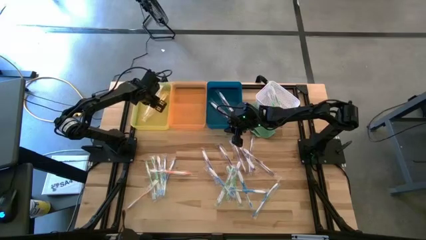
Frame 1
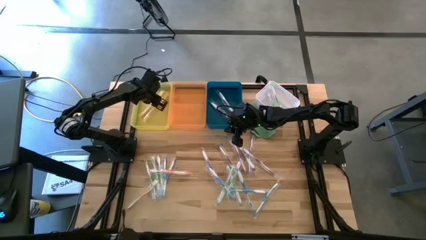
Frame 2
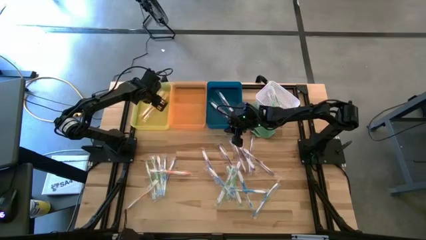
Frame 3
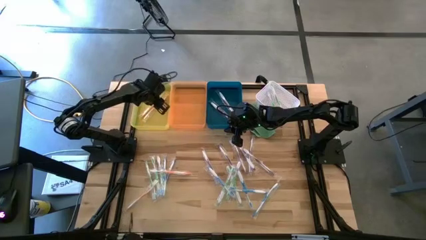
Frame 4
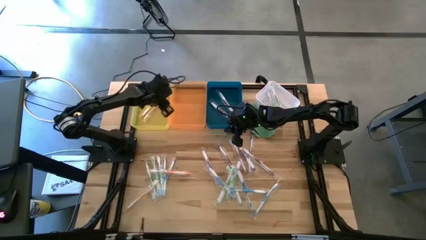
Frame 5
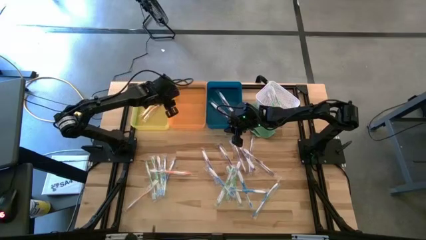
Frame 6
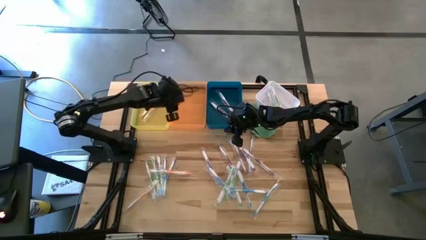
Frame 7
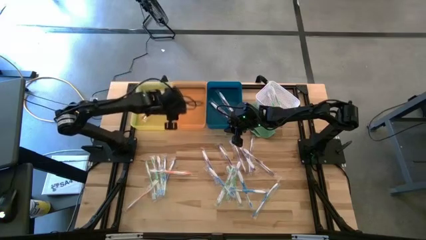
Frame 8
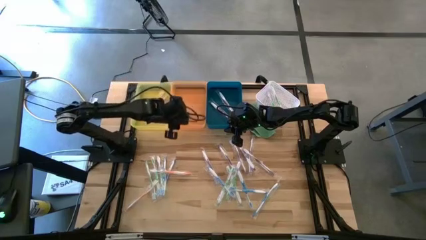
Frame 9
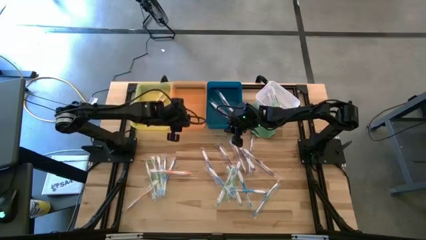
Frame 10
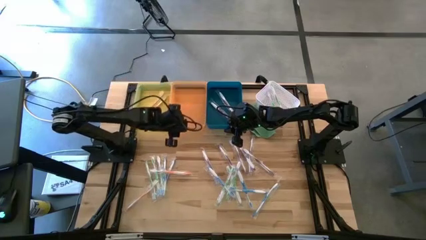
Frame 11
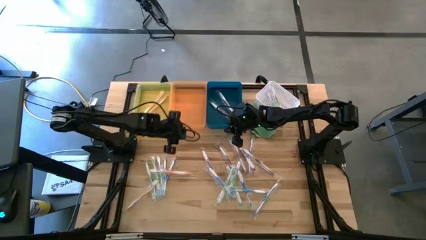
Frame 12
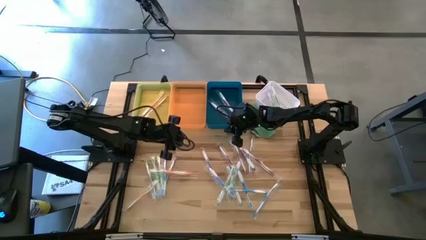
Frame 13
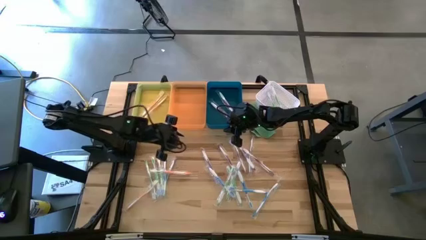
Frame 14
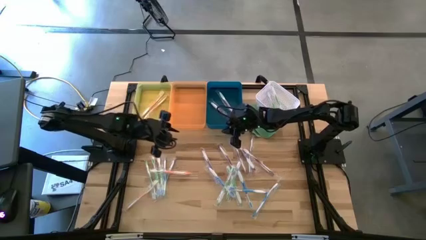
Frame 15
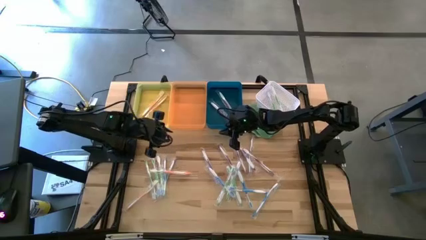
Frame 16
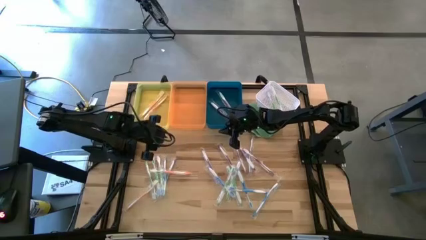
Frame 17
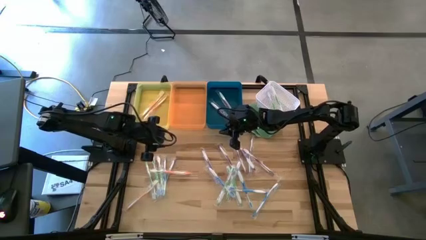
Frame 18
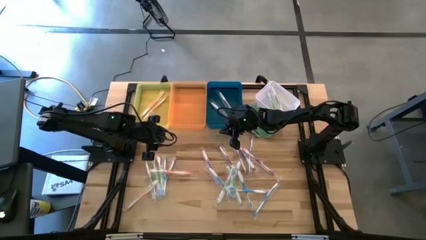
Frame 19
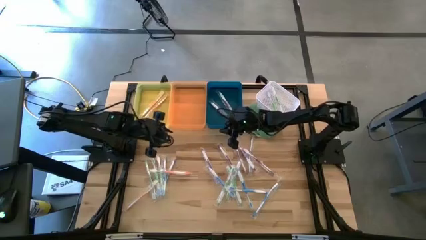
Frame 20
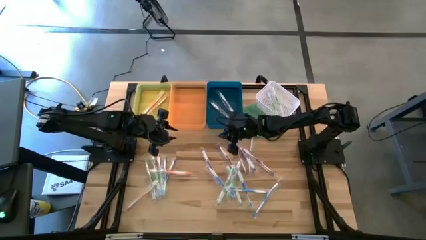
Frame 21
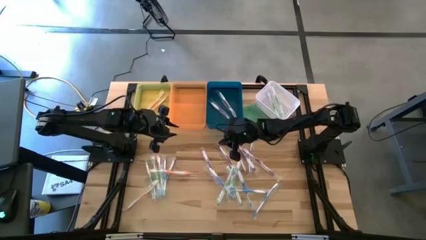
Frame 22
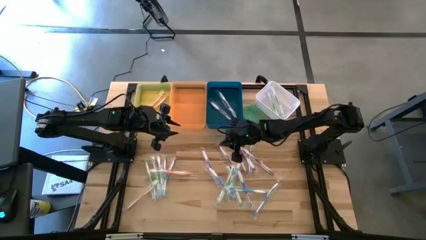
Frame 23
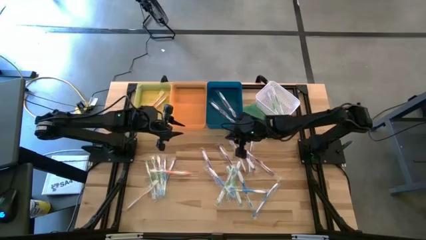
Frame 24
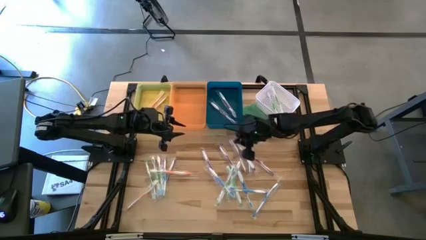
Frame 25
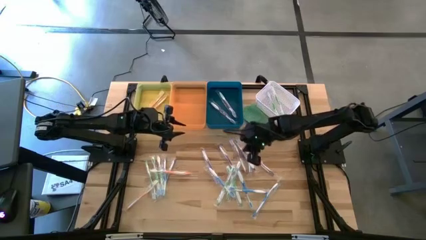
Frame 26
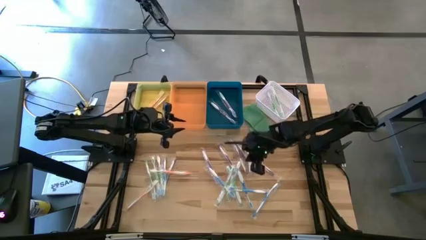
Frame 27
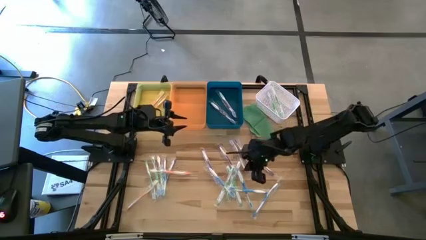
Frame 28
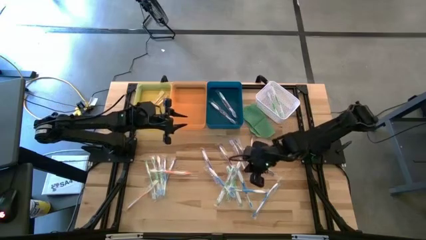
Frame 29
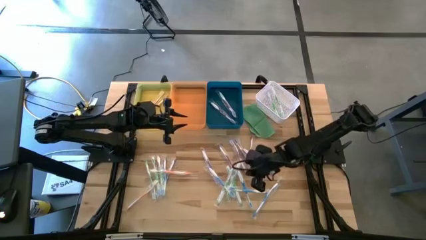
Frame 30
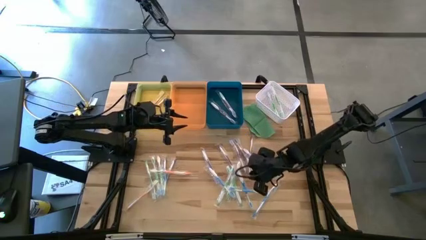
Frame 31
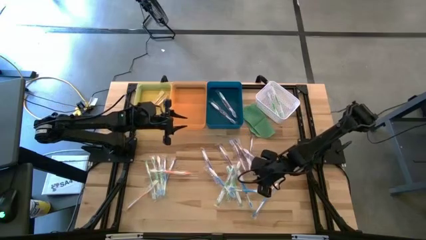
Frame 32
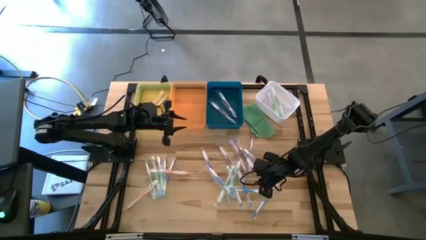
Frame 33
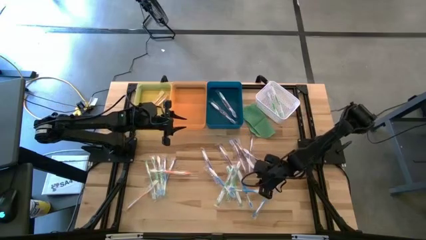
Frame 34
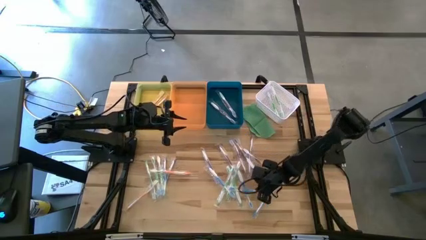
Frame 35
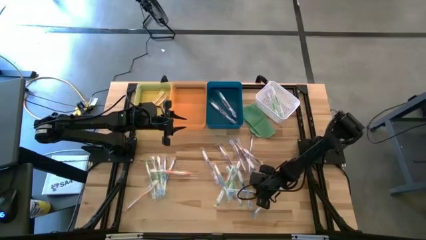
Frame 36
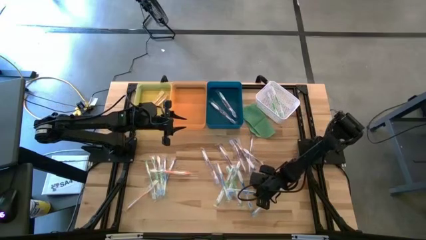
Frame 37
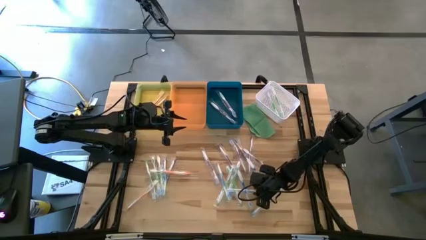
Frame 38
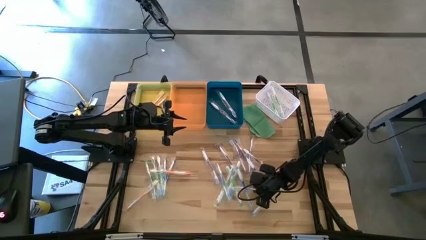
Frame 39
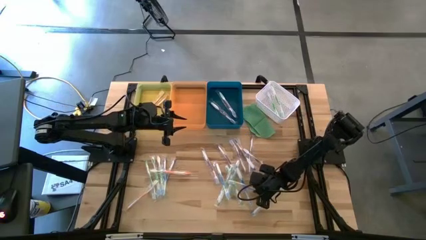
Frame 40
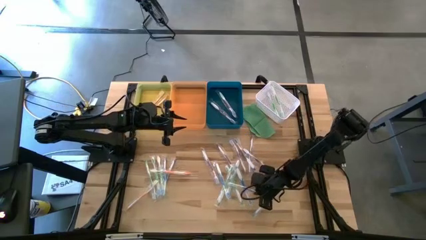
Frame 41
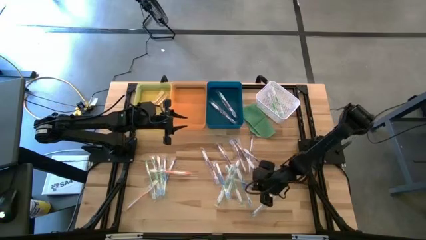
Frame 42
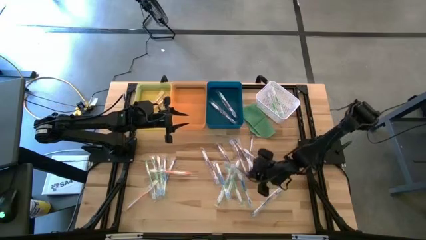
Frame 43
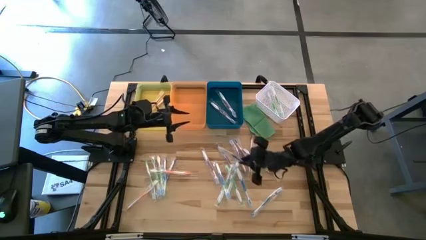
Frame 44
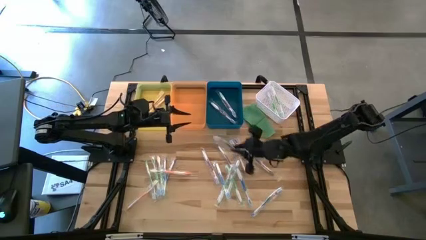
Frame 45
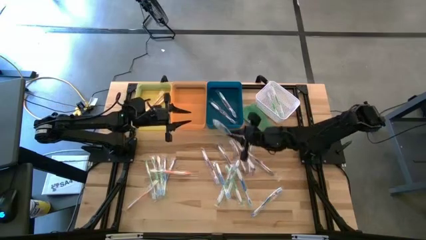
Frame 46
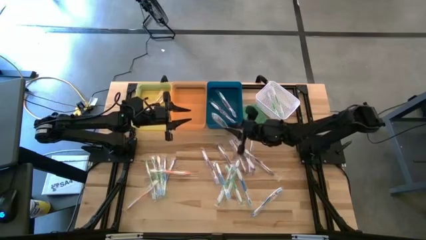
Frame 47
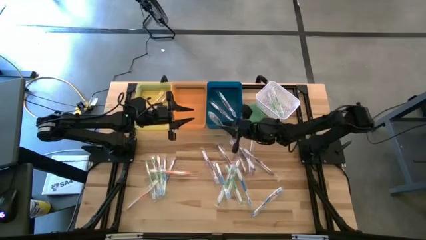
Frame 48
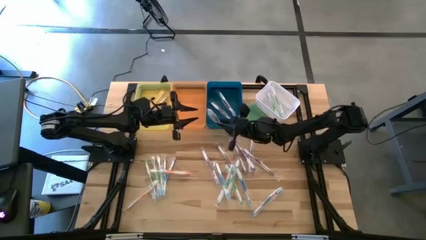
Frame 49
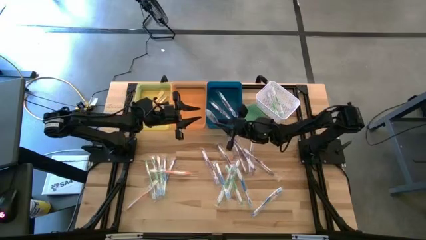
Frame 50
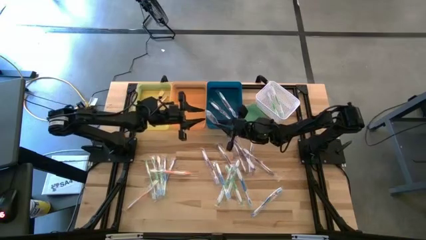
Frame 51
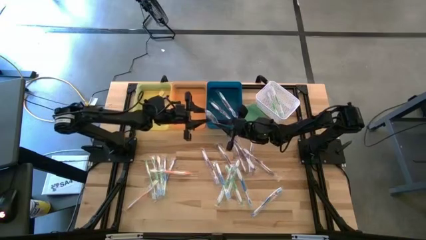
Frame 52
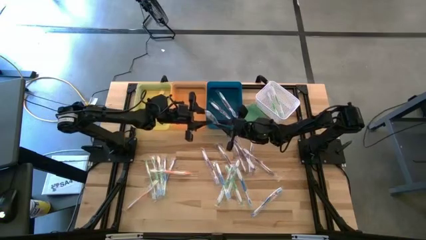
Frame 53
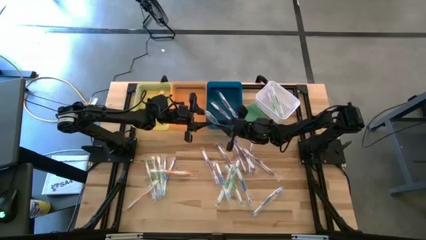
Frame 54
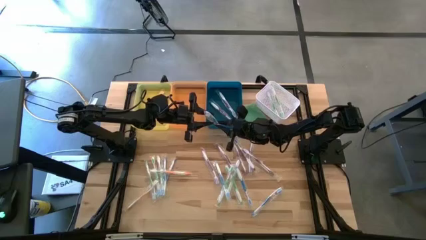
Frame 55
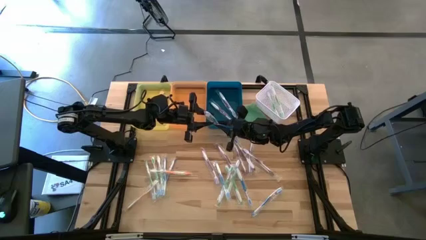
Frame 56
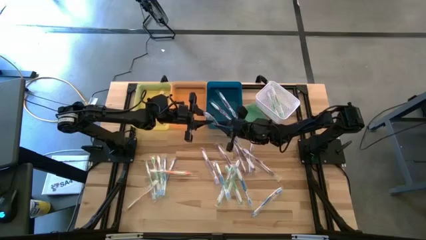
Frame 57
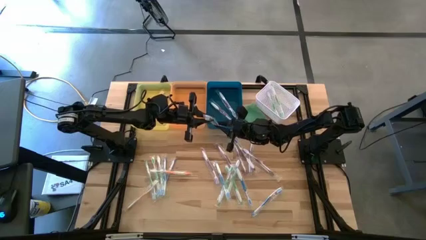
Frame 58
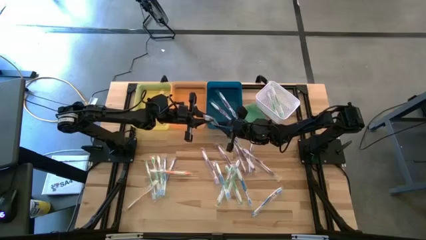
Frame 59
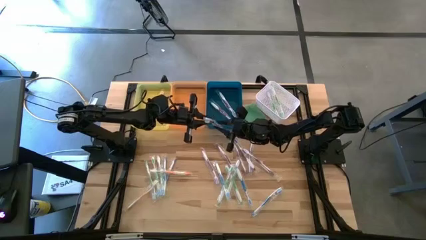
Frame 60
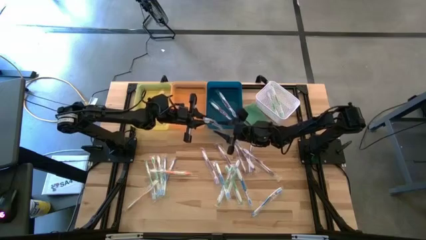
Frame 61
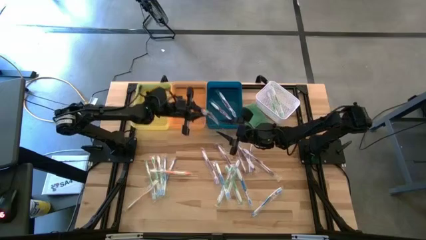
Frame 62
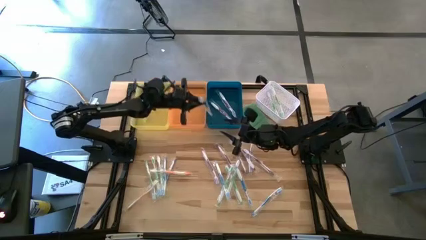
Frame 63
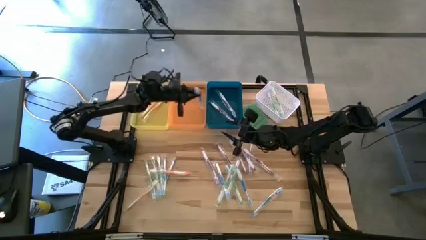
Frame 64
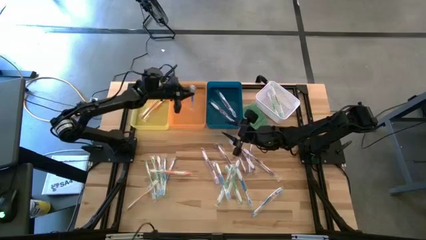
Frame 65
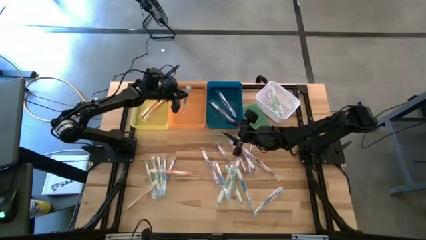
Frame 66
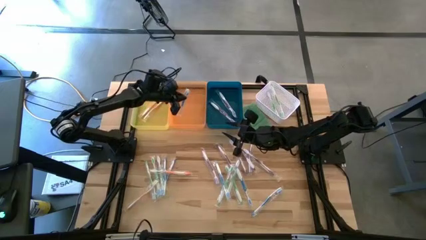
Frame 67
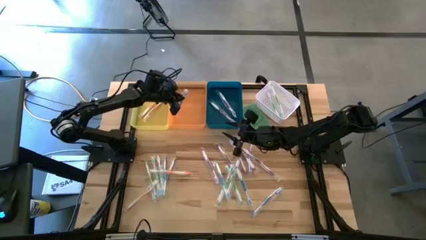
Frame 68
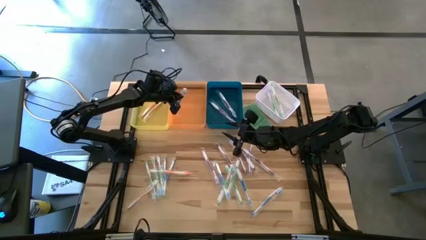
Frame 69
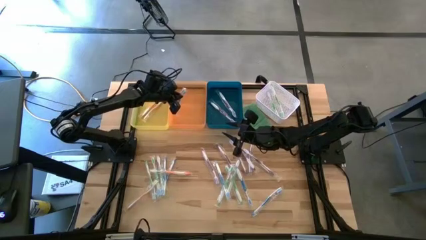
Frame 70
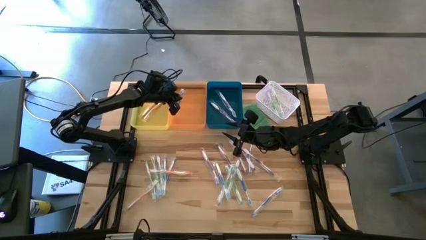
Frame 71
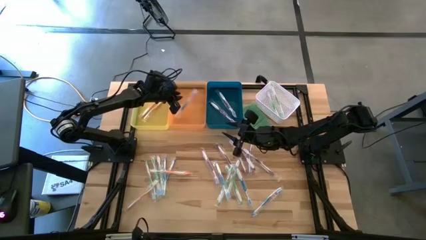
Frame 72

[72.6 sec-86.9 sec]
Task: Pick & Place Toothbrushes
Put the blue toothbrush into the orange bin
